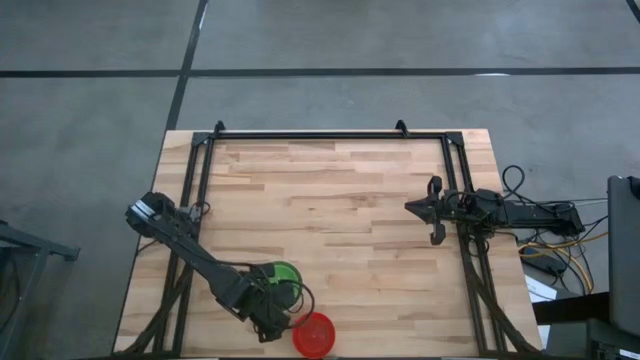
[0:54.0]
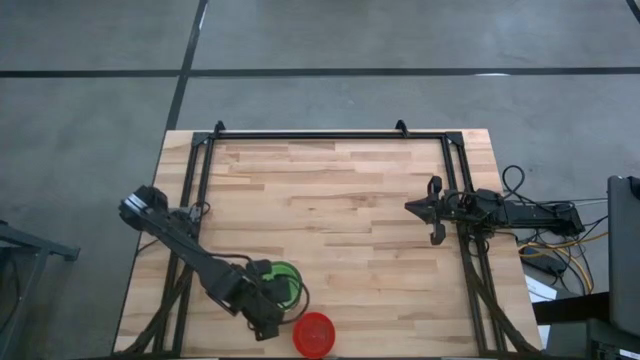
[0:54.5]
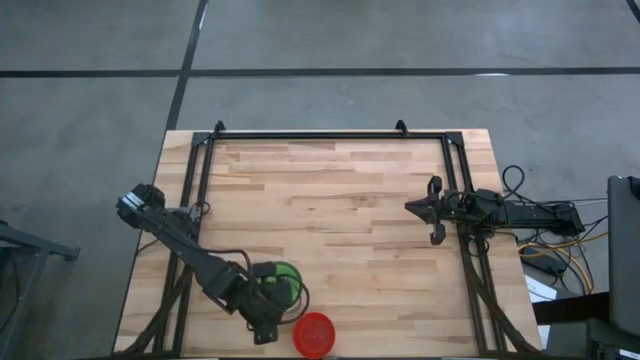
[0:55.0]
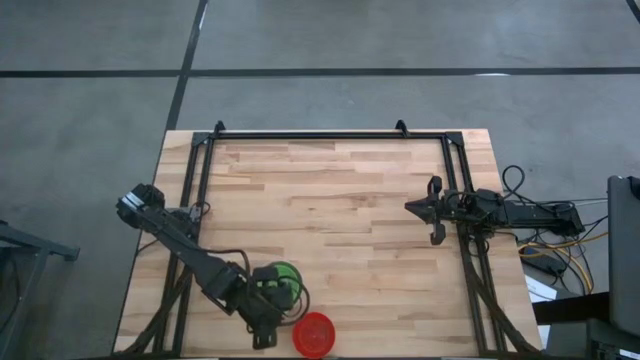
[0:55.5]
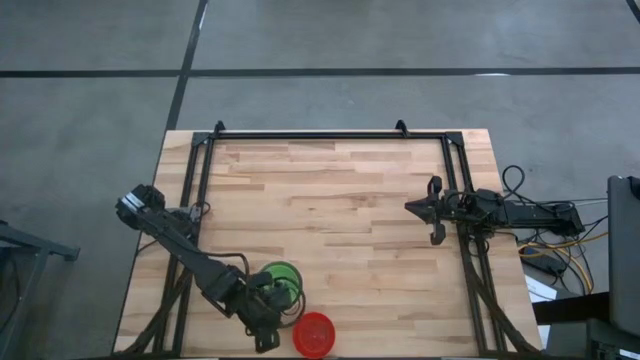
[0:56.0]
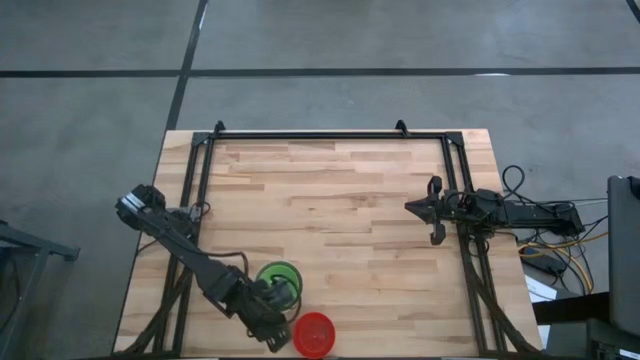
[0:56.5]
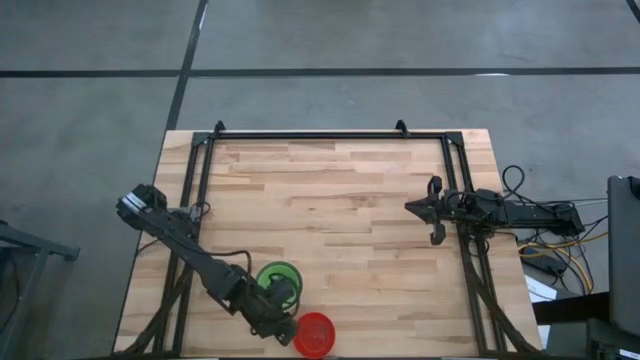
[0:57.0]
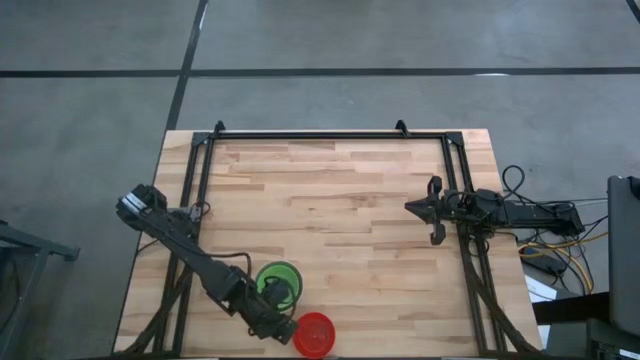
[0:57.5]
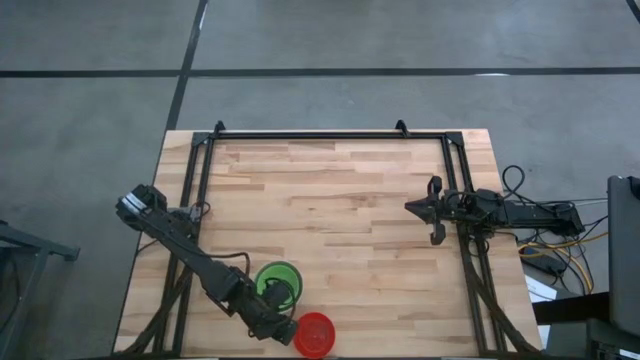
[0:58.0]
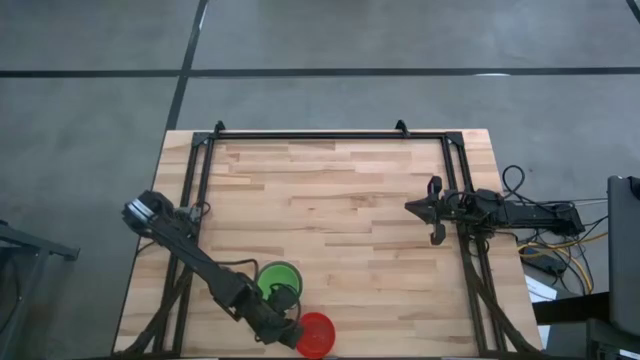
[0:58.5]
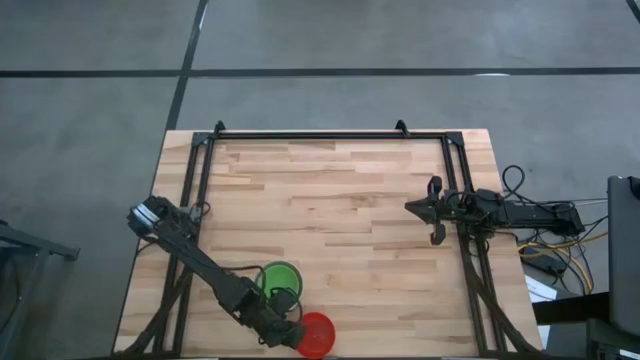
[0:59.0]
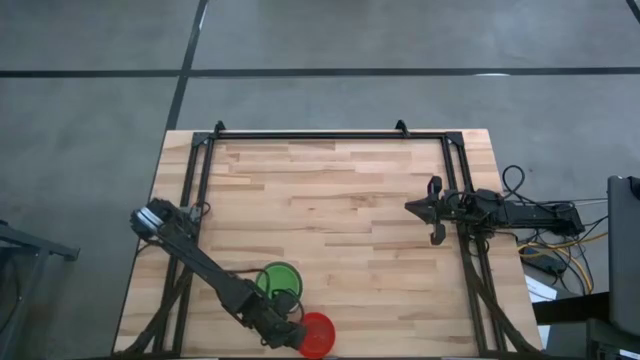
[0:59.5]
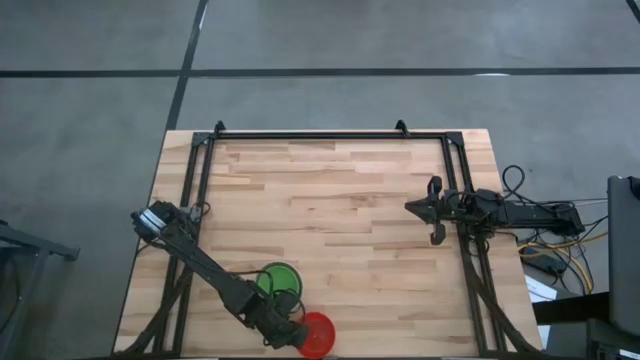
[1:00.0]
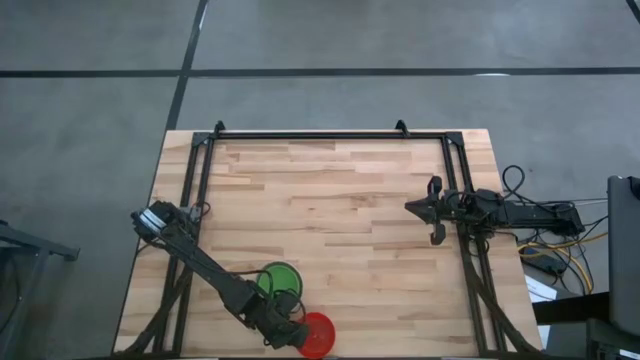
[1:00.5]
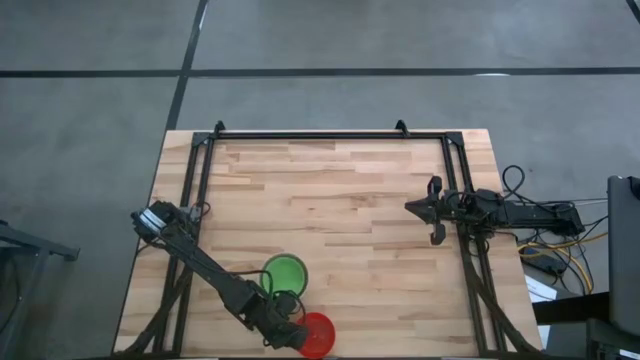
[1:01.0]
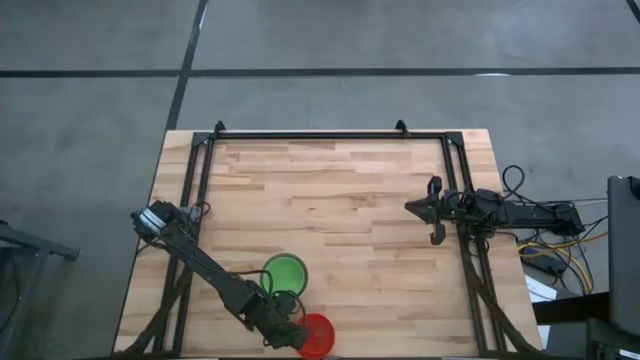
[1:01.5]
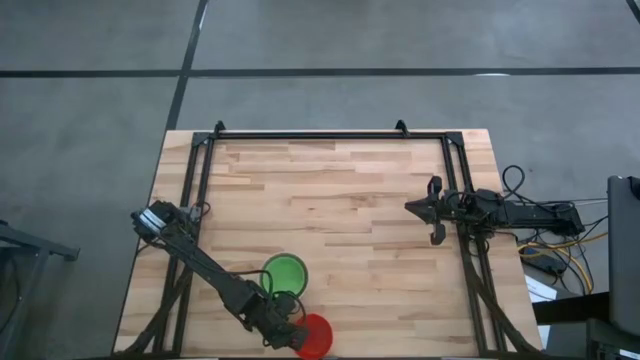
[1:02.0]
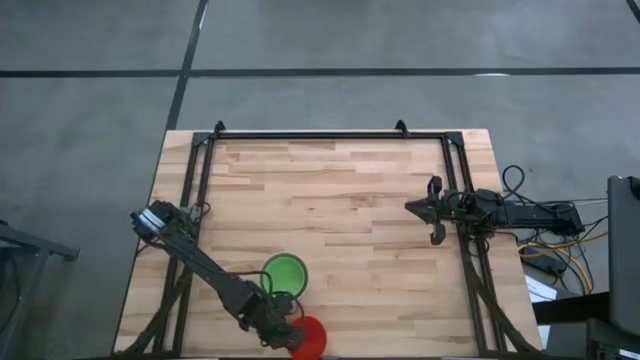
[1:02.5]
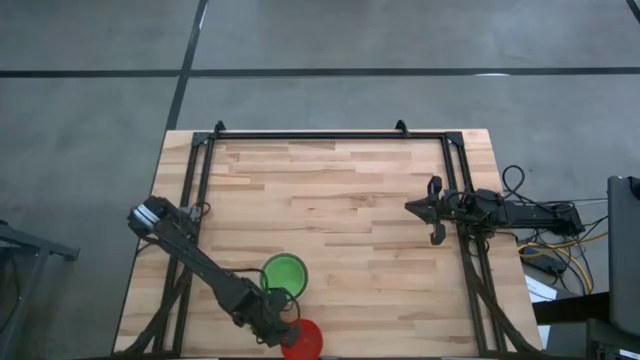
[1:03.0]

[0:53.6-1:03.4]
Stack the red bowl on the green bowl

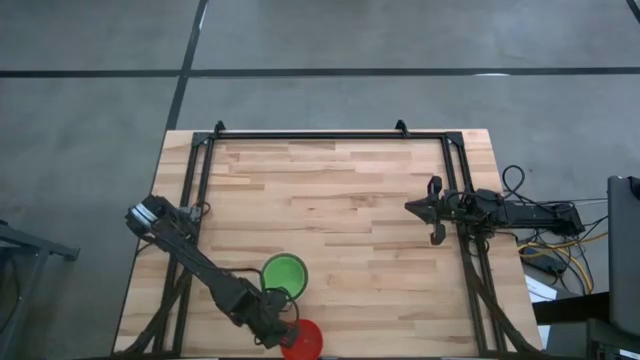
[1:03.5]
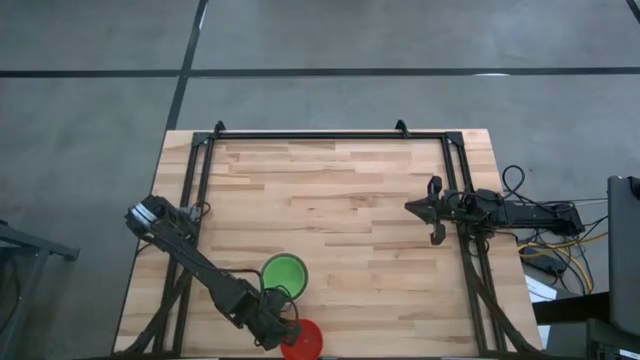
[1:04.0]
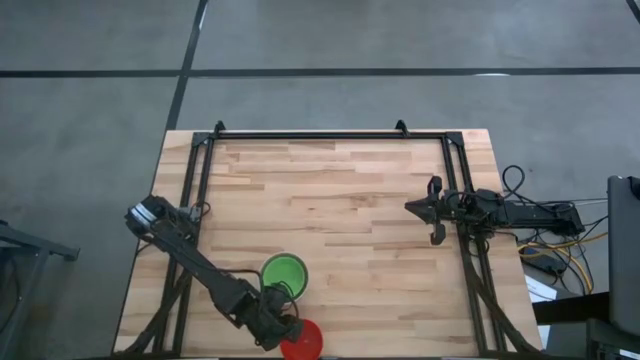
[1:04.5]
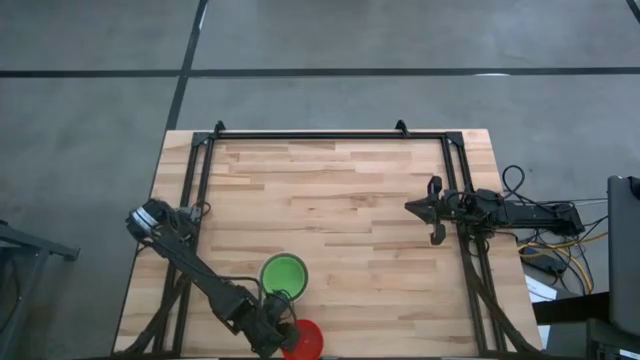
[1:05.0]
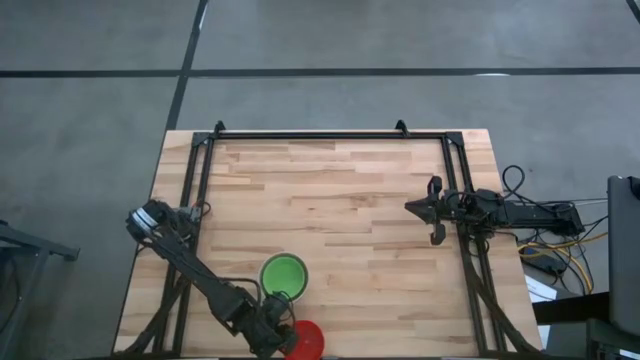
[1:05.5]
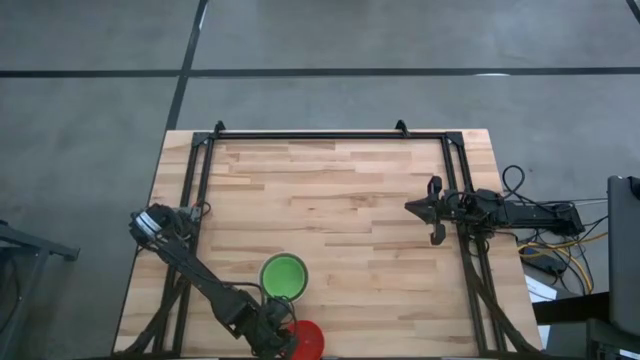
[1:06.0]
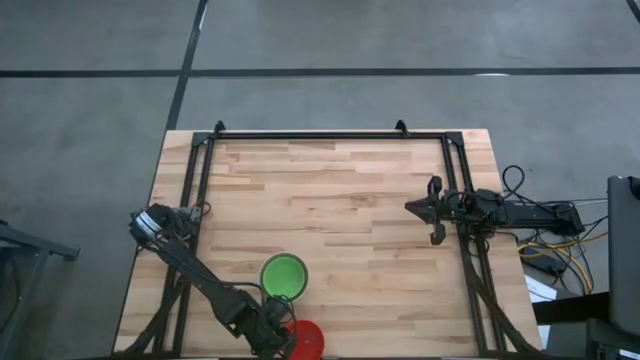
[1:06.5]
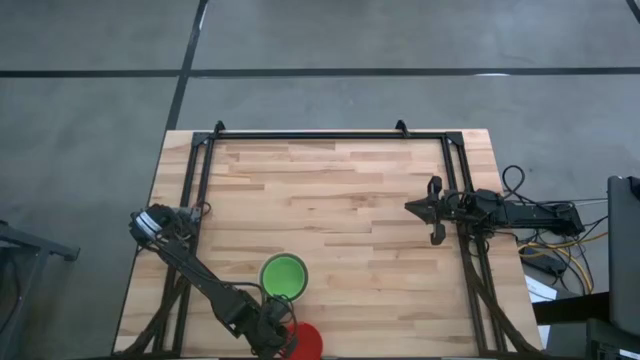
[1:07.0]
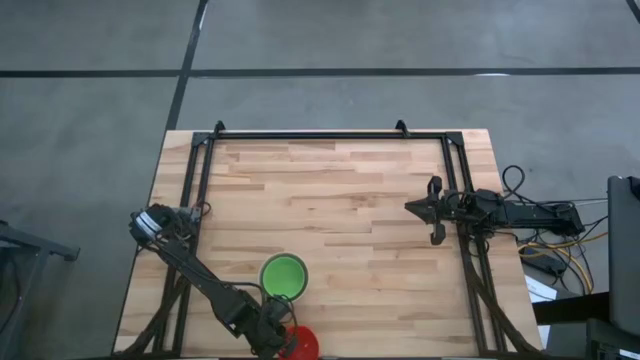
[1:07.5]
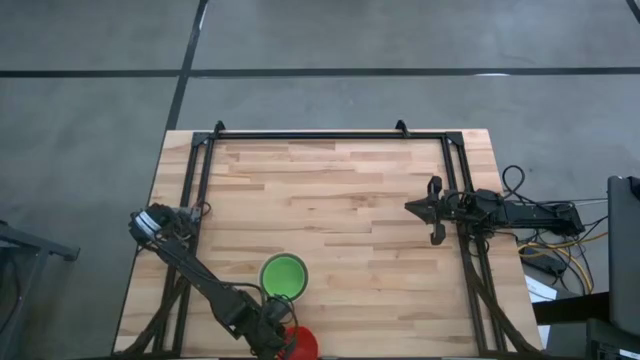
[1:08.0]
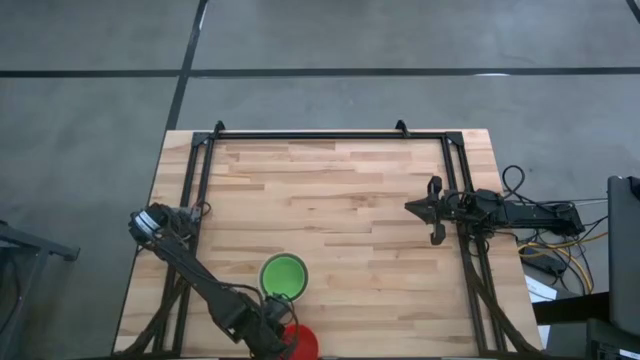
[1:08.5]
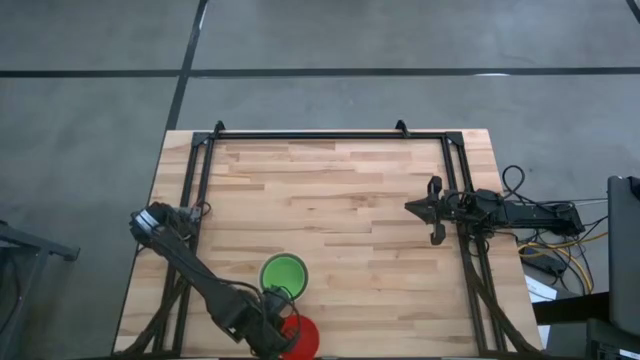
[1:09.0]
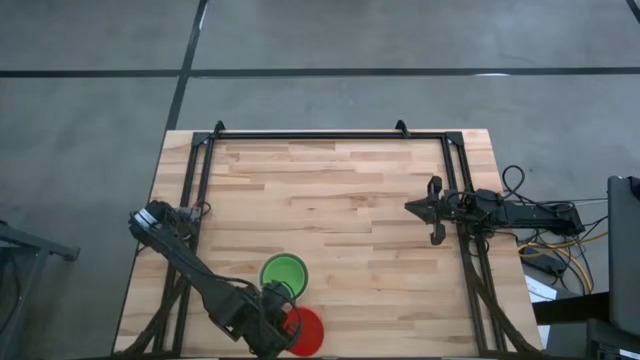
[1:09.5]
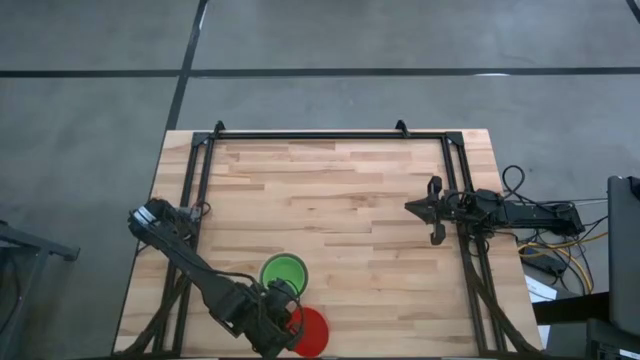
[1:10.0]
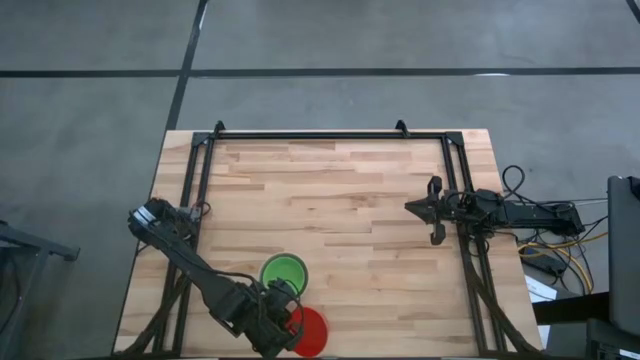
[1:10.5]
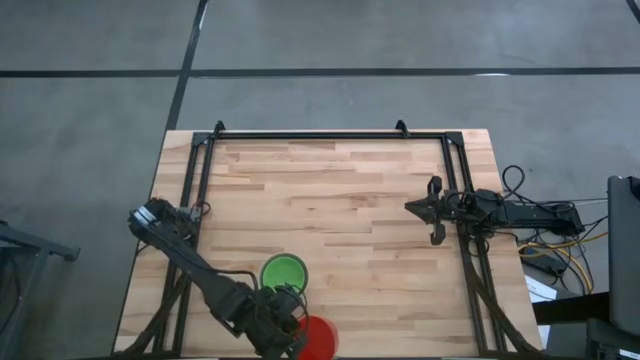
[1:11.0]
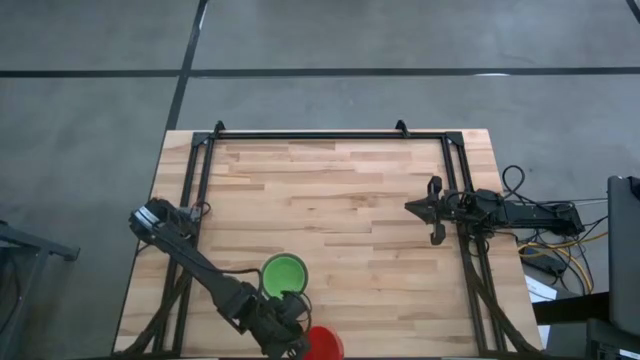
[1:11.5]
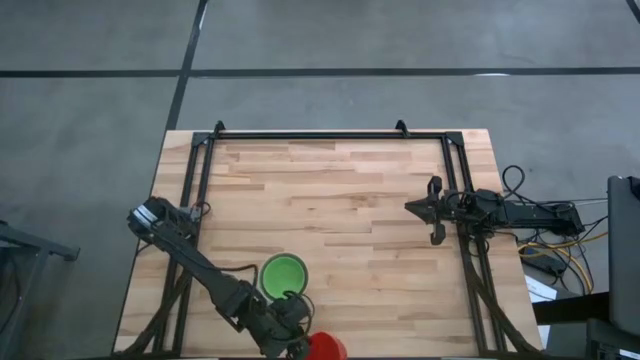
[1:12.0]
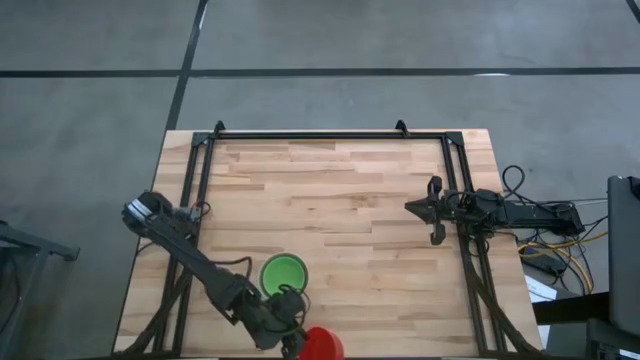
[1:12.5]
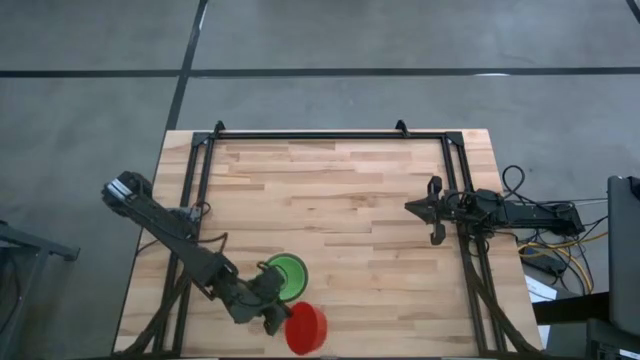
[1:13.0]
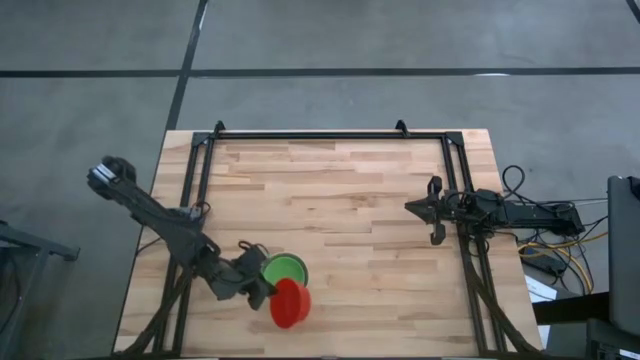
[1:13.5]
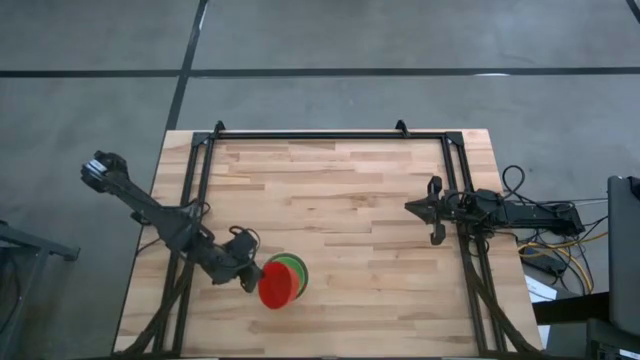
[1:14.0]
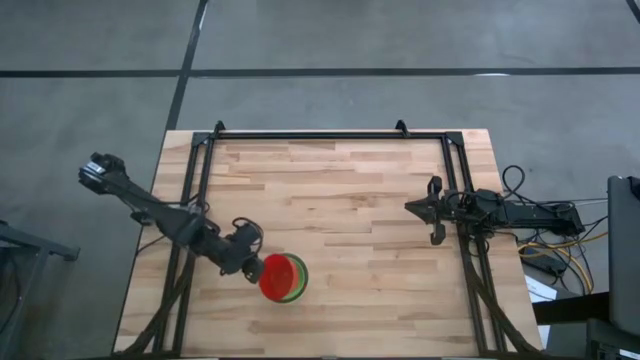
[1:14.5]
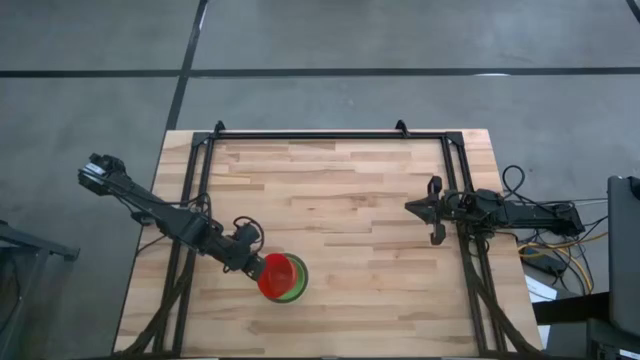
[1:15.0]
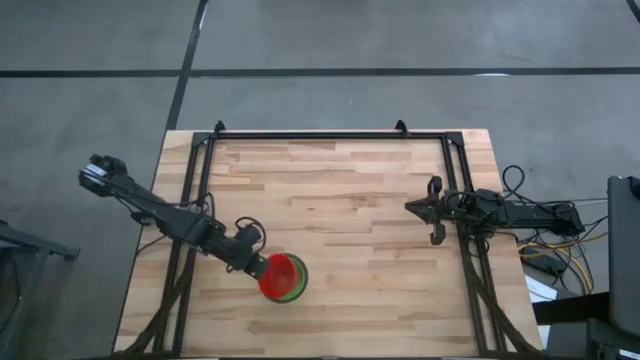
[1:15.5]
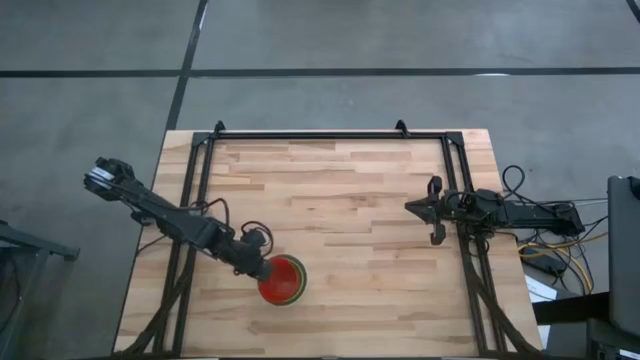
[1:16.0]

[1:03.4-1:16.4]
Stack the red bowl on the green bowl
